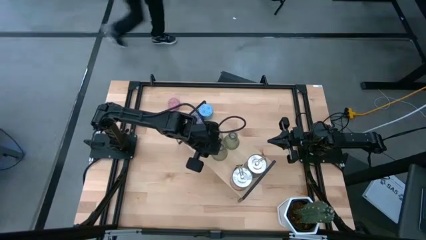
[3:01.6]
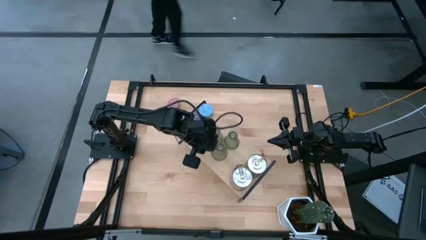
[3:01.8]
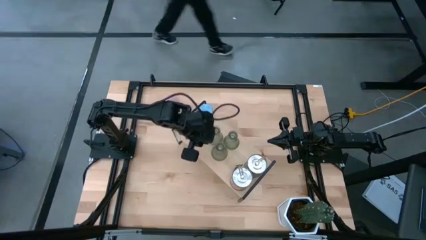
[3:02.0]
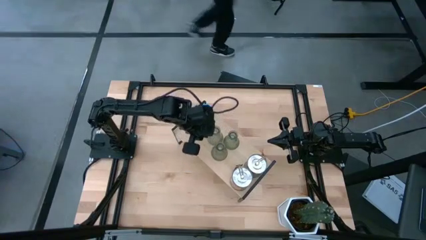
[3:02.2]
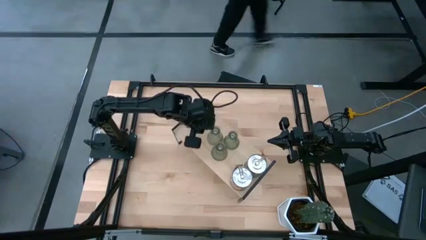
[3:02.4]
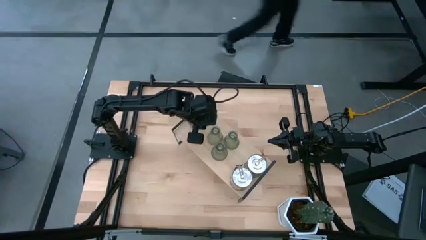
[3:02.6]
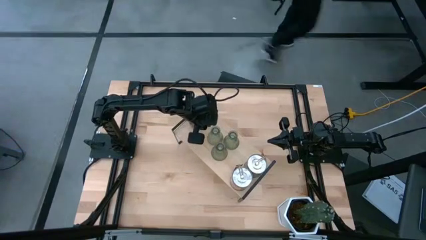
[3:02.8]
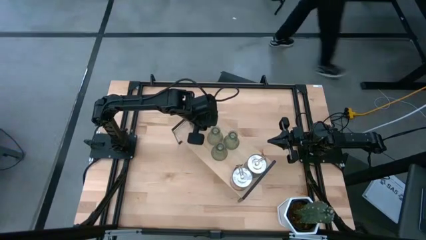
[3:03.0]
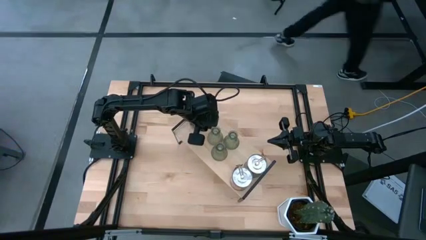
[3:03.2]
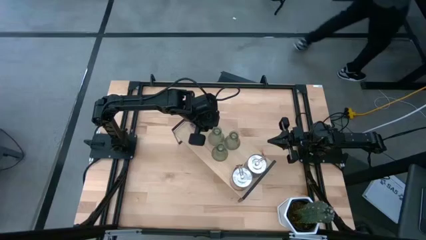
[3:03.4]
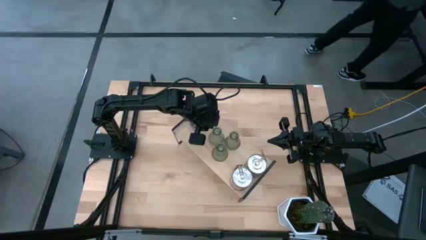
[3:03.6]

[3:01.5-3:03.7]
Task: Pick & Place candle stick holders
Adjust the transparent candle holder on the shelf

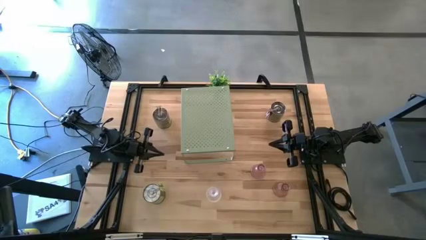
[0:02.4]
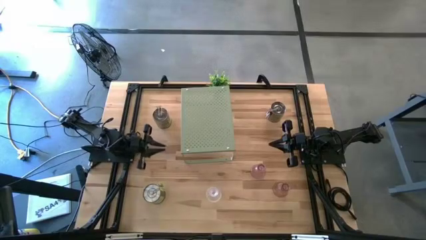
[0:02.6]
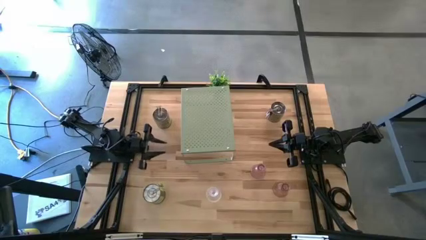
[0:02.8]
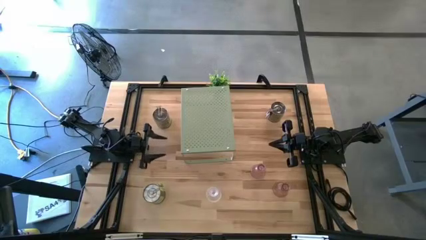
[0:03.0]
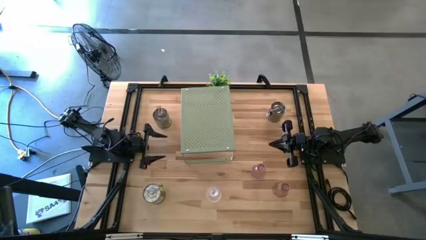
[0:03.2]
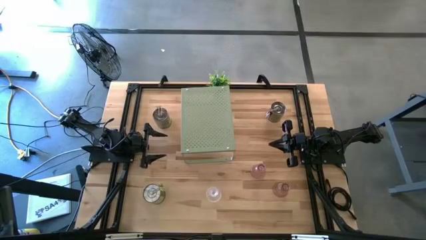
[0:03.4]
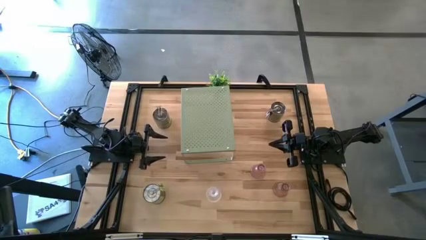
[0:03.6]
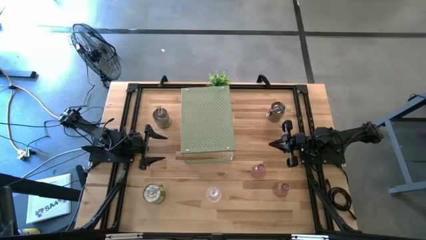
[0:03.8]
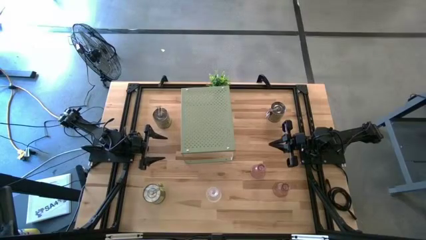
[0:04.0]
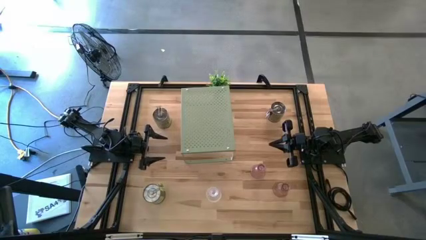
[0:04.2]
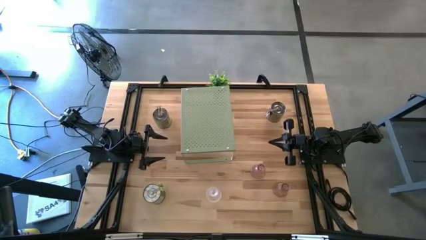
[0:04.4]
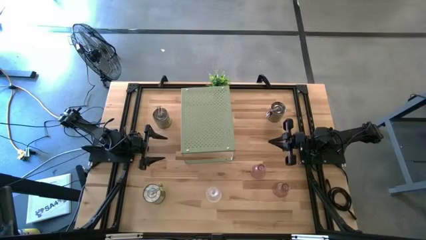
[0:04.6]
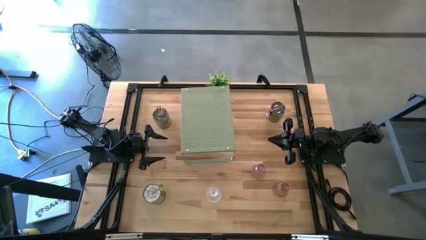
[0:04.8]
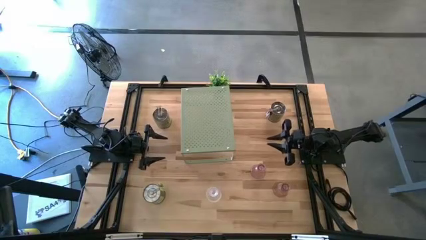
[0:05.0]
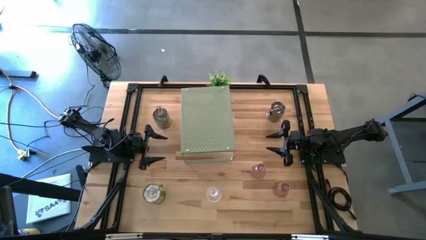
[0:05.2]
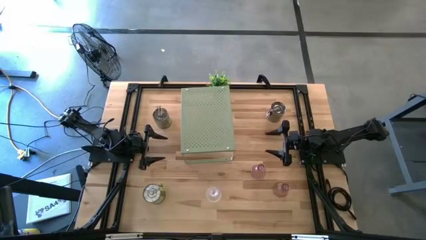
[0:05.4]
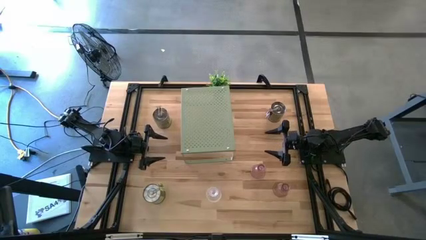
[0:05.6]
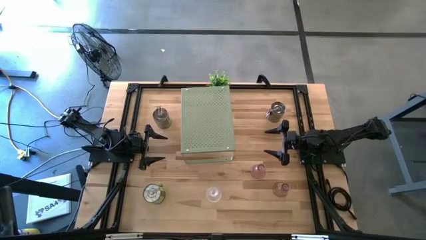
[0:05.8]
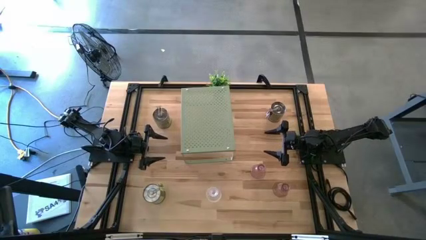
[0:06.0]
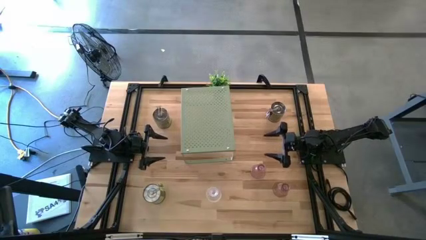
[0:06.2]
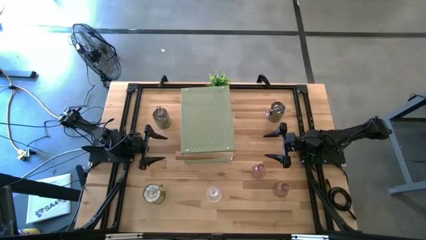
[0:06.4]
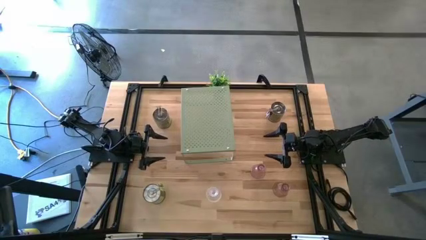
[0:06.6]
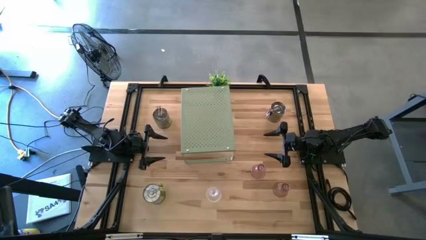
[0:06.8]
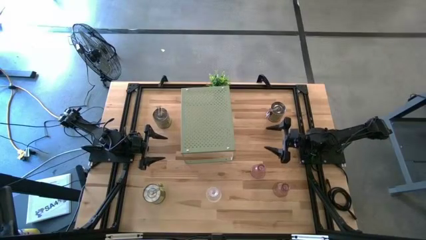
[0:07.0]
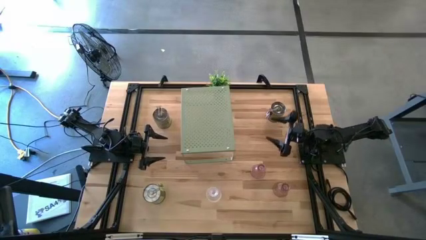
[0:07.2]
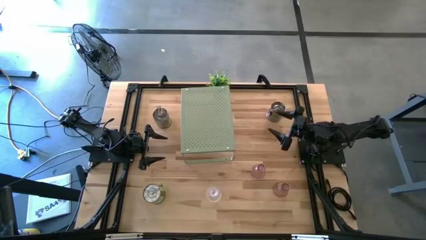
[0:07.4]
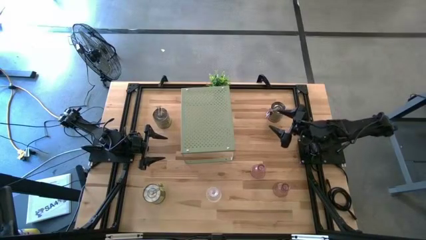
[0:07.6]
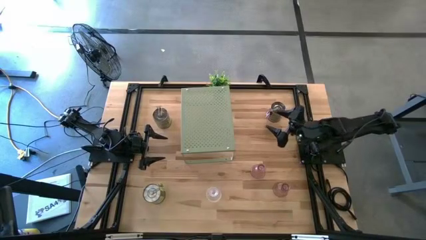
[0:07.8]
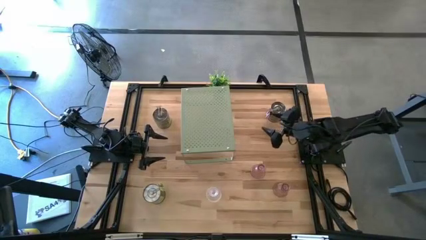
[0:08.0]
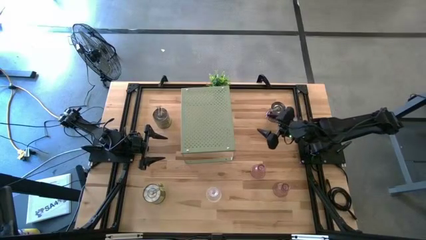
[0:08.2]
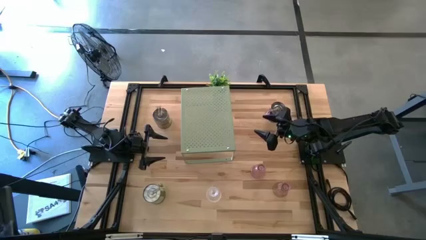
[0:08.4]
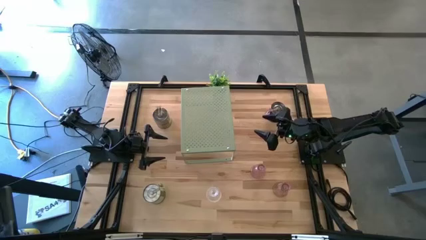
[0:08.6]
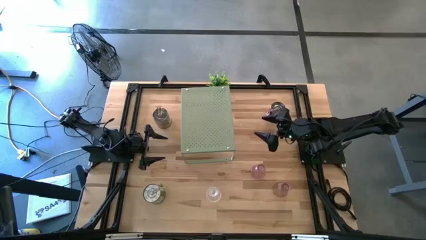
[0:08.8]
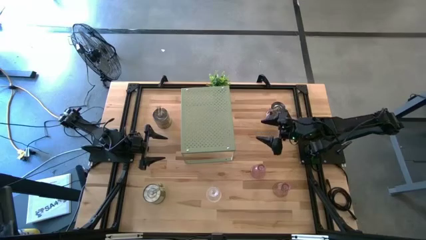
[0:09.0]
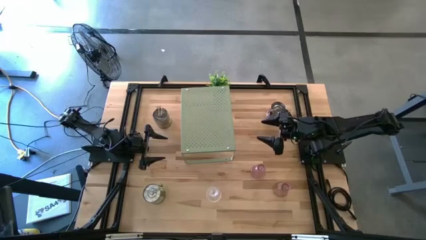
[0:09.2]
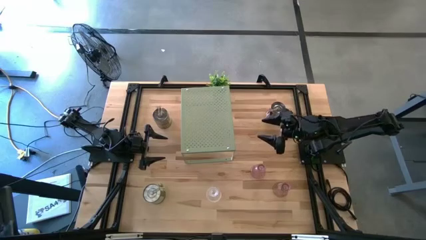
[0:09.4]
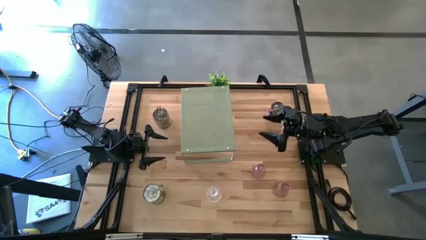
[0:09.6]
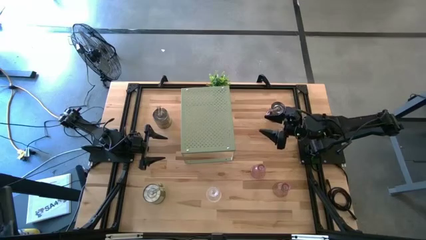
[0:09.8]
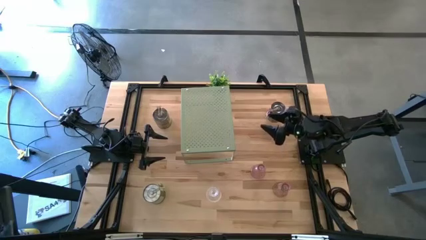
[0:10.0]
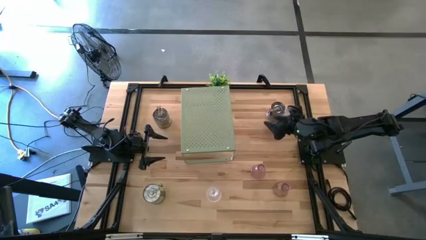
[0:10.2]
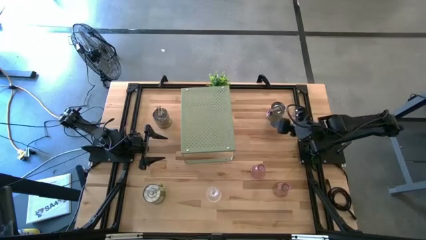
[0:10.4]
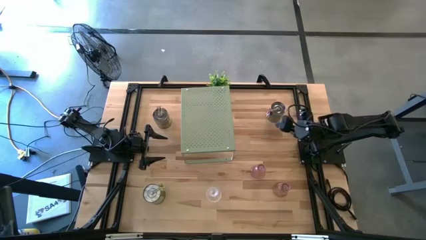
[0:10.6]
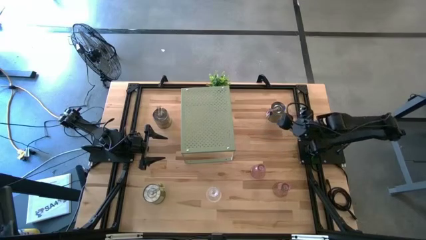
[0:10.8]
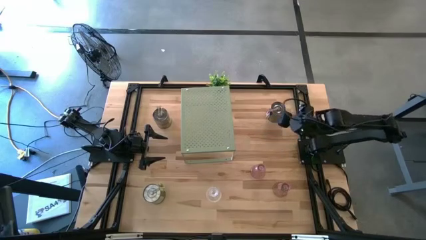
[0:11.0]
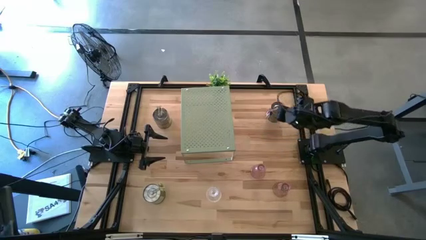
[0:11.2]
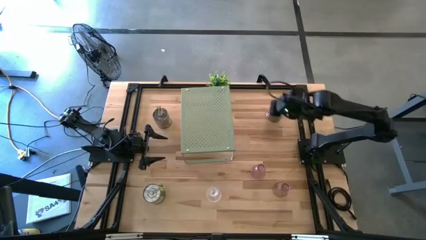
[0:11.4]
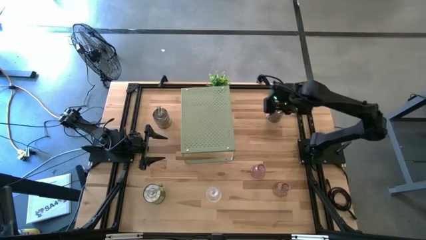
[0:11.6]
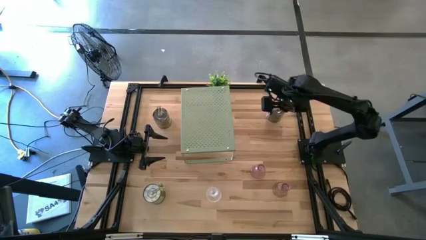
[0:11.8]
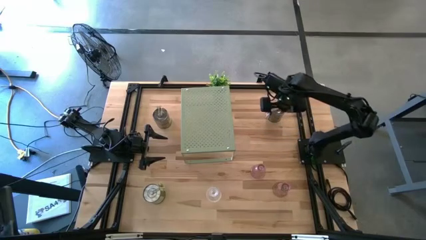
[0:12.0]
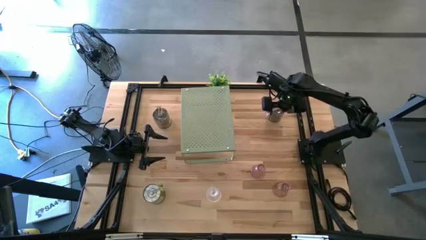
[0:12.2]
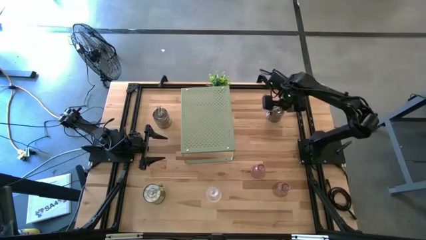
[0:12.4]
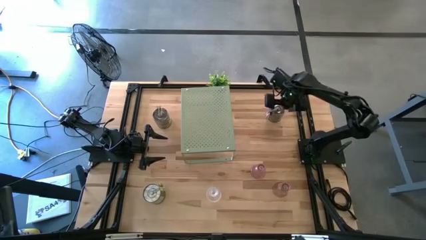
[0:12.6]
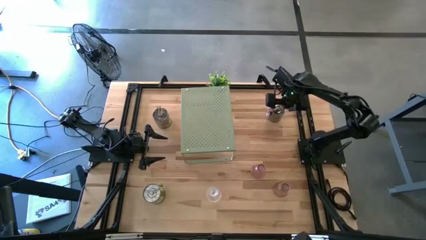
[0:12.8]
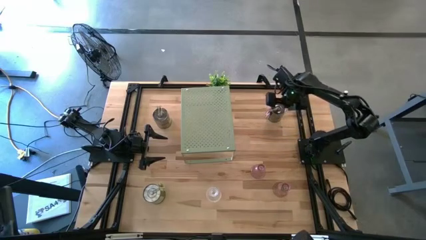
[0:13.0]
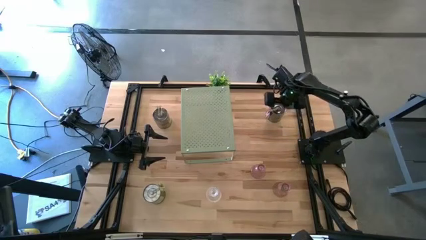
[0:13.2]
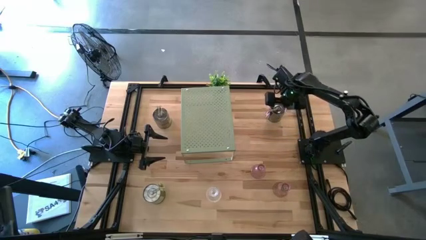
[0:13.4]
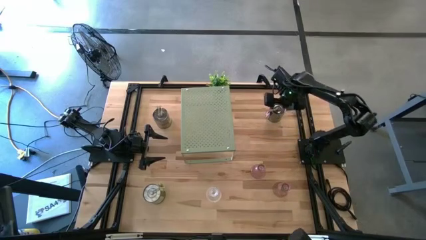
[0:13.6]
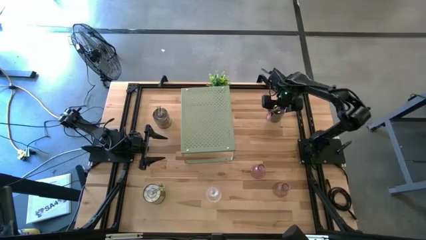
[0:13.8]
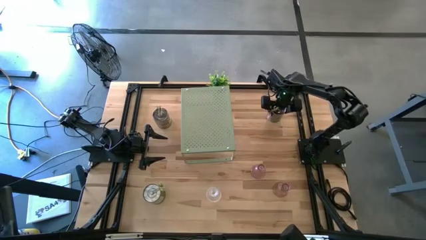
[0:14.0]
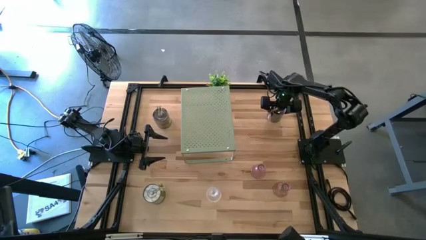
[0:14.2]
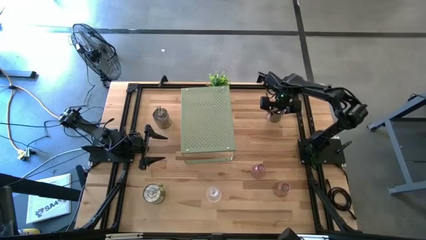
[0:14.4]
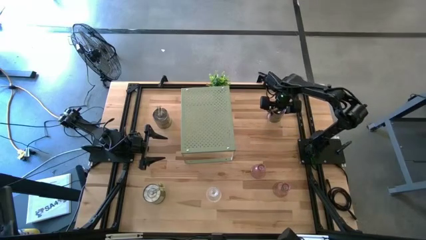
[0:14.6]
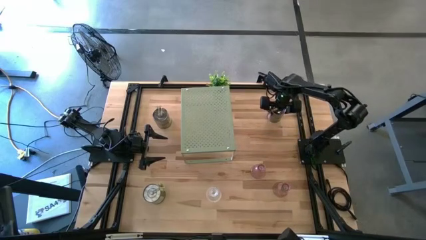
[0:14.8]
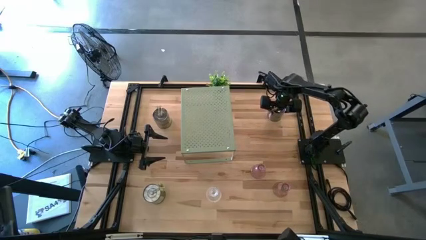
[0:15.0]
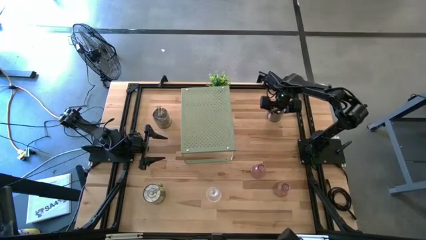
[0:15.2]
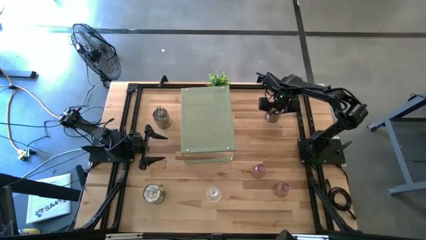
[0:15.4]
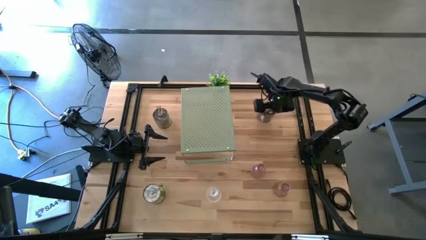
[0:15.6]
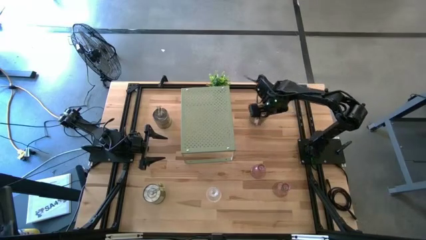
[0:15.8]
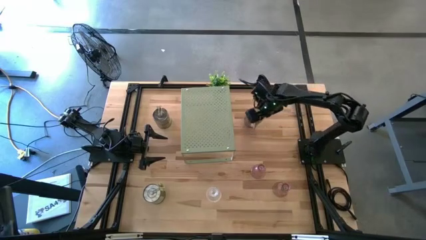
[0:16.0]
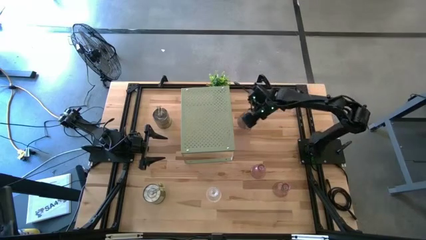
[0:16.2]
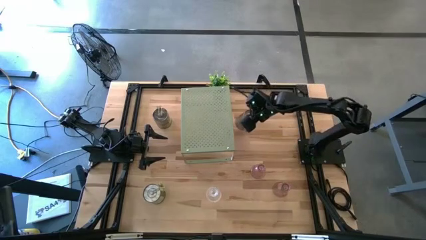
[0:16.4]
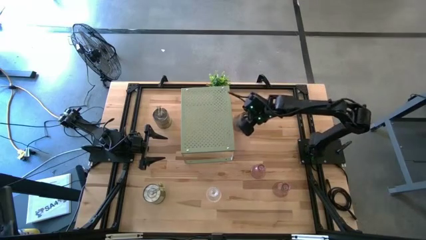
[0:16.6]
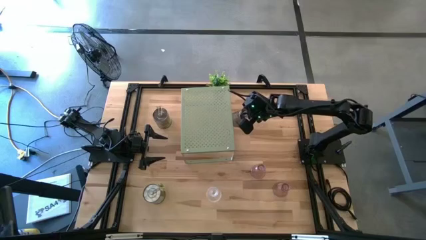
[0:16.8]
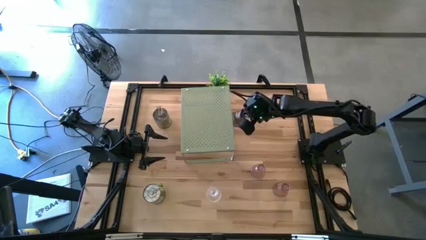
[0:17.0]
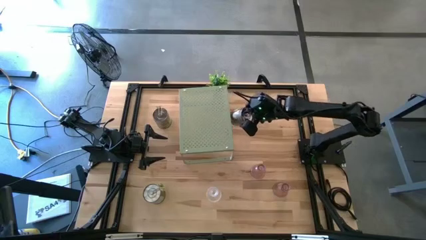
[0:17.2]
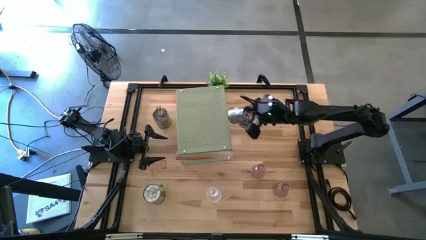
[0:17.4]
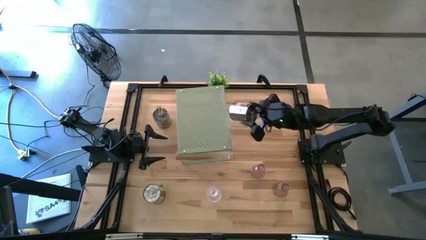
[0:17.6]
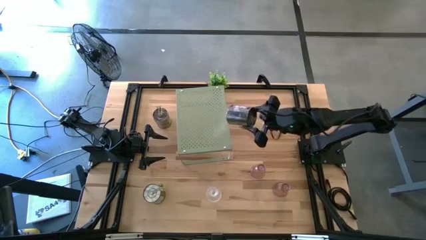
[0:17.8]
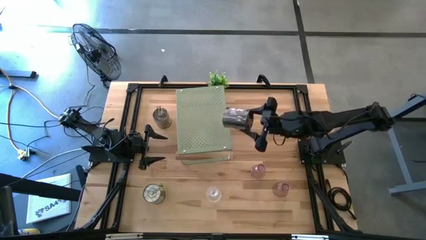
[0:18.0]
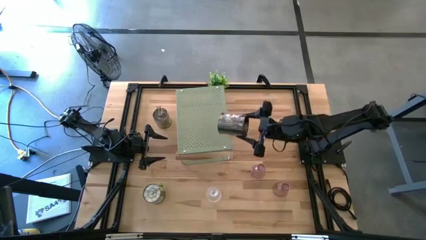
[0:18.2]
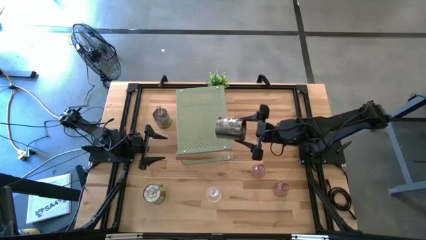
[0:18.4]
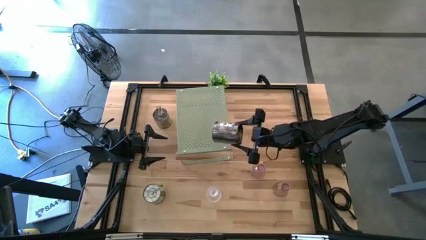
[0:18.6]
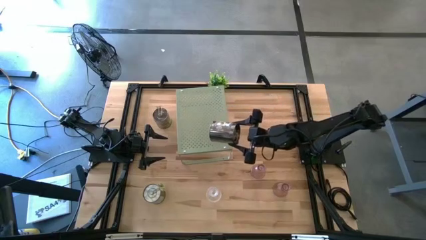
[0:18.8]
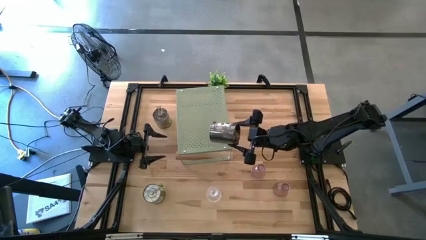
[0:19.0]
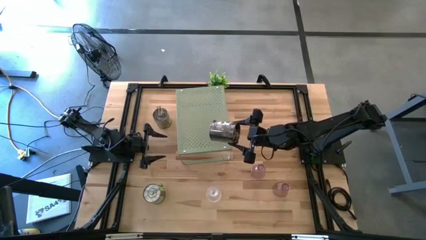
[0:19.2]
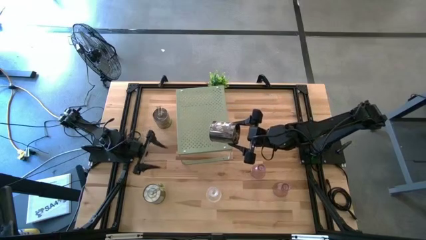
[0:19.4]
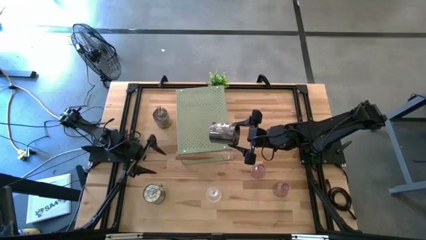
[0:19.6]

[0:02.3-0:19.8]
Task: Pick & Place candle stick holders
Put the right brown scented candle on the shelf
